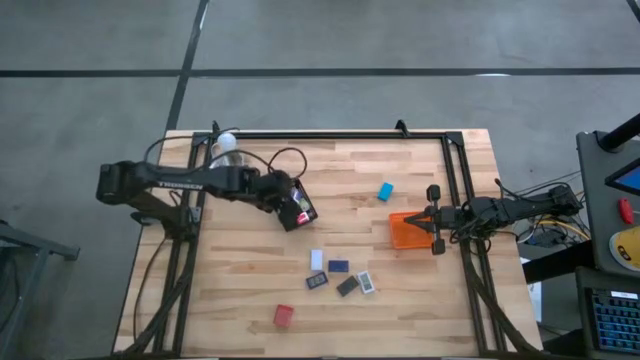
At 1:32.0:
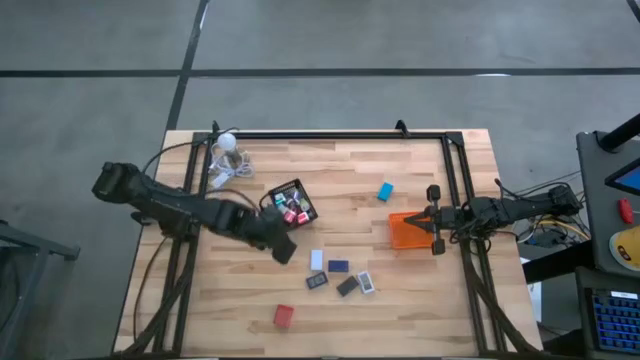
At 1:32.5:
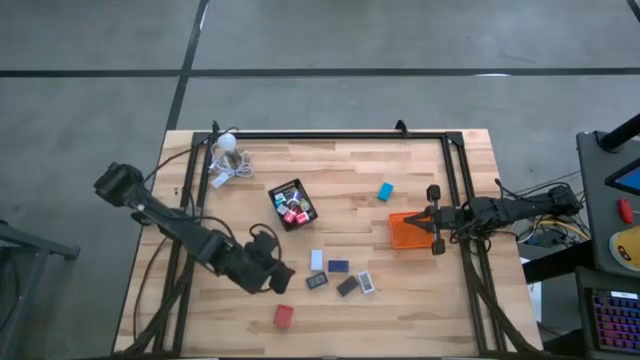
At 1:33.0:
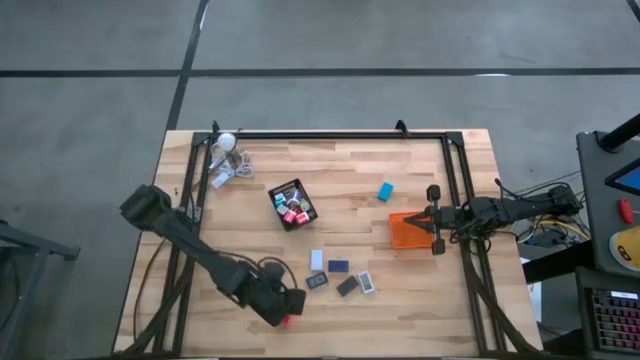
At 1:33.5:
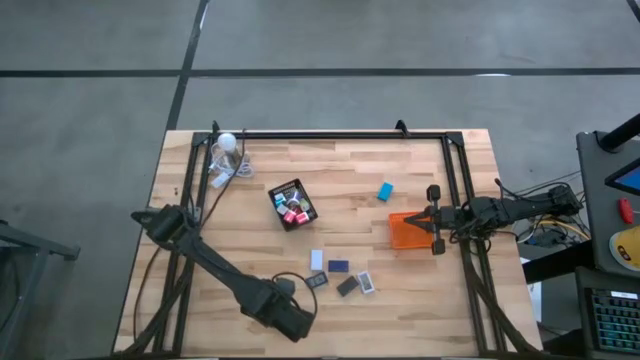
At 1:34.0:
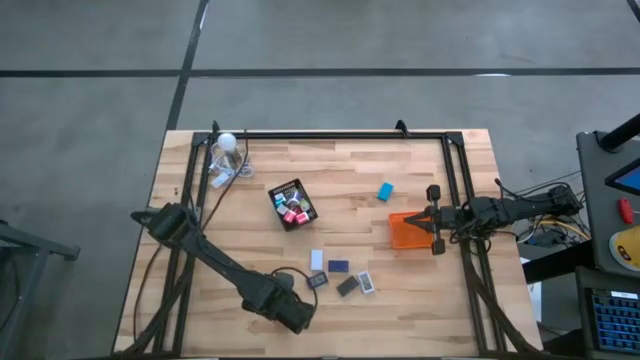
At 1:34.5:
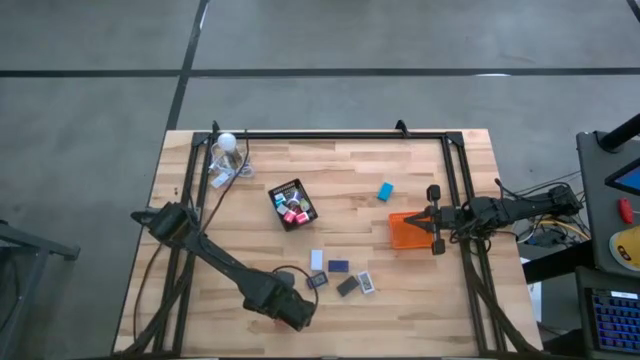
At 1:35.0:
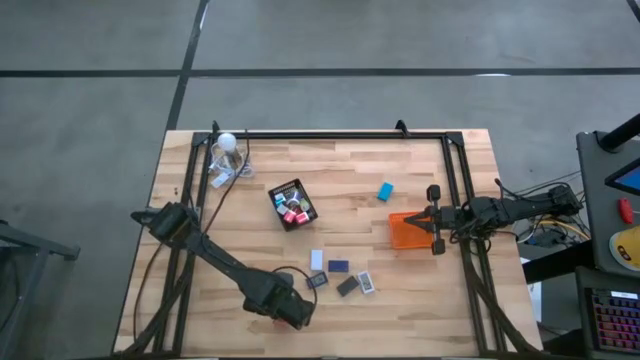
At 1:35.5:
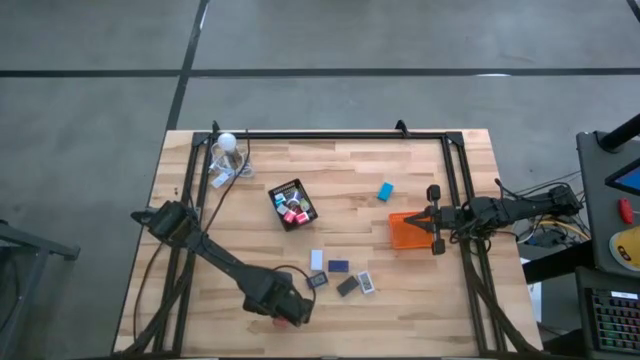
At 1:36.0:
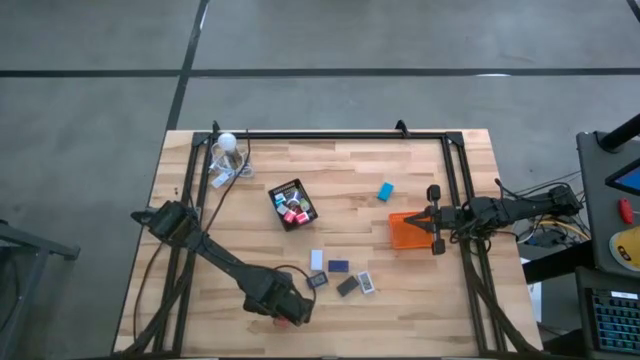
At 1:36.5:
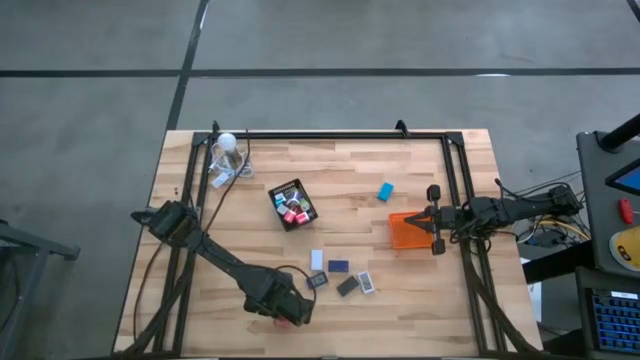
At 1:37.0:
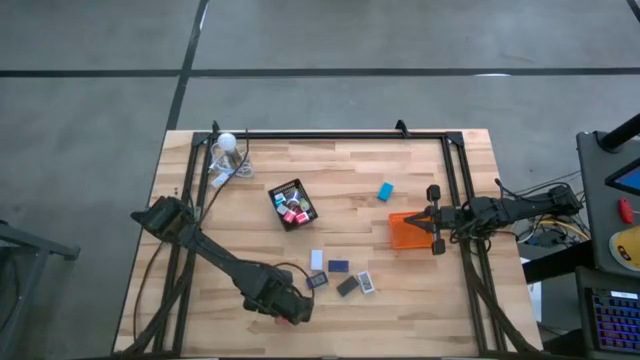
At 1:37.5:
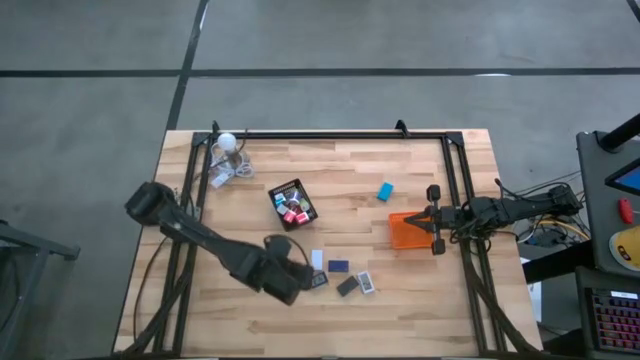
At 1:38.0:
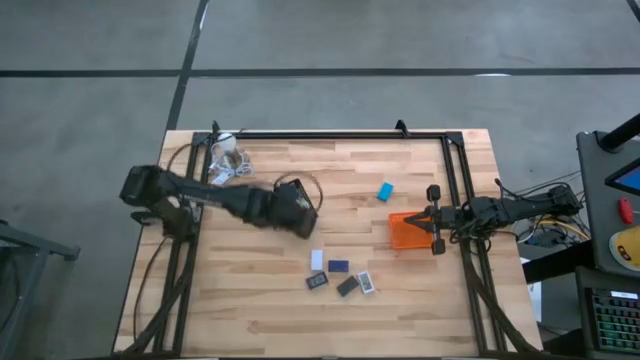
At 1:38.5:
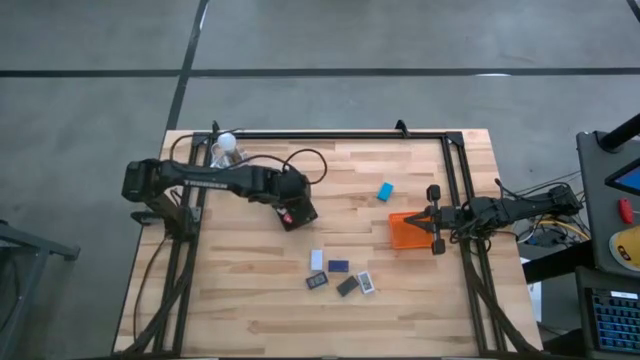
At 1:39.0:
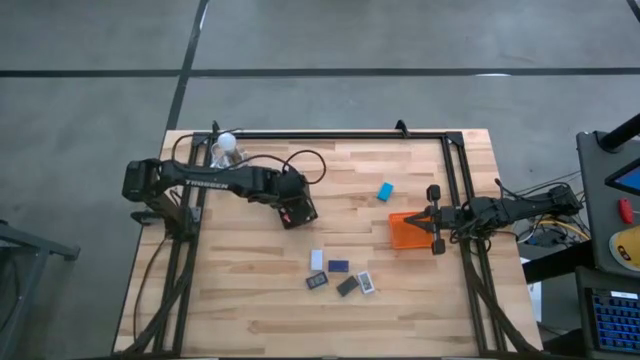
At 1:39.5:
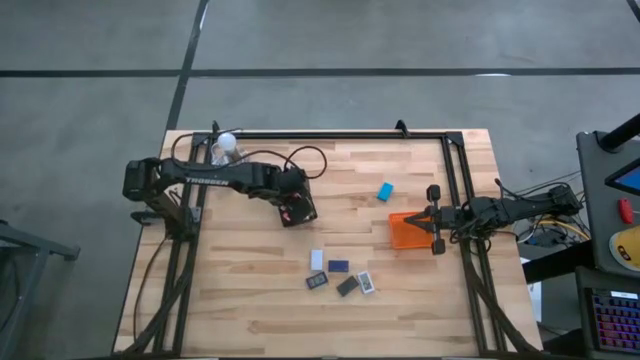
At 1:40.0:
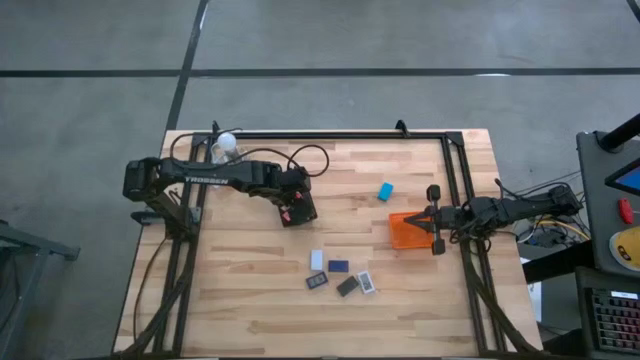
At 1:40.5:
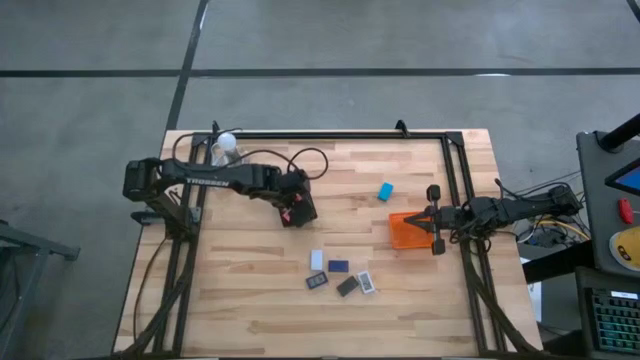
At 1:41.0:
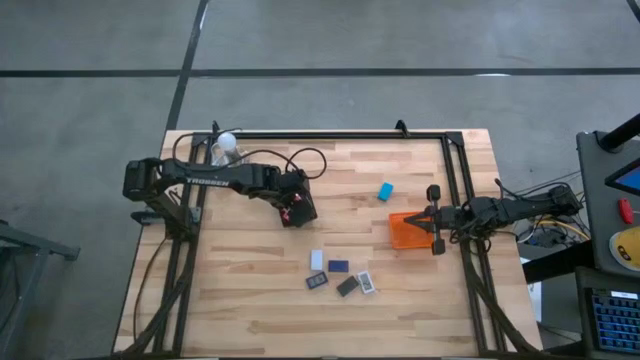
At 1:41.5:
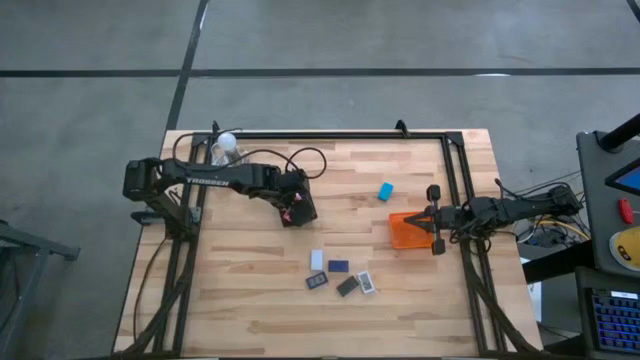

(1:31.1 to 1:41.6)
Task: Pick & Place Office items
Put the red charger adapter in the black bin

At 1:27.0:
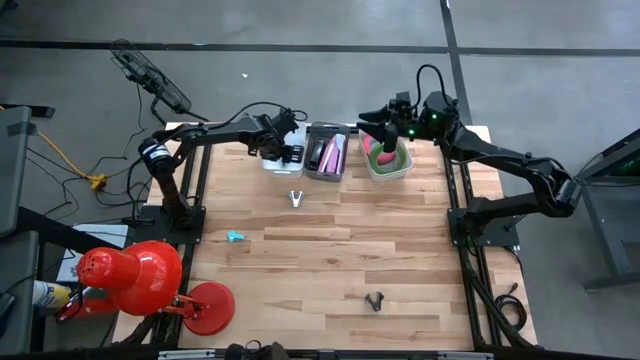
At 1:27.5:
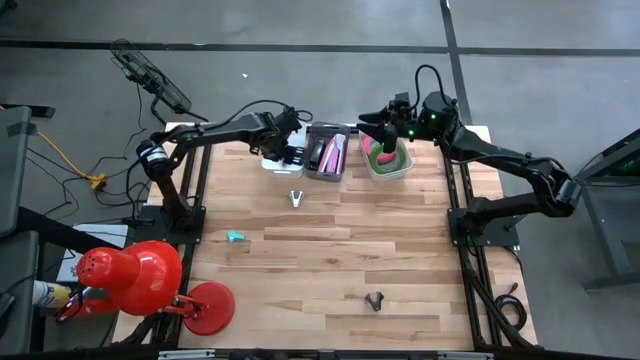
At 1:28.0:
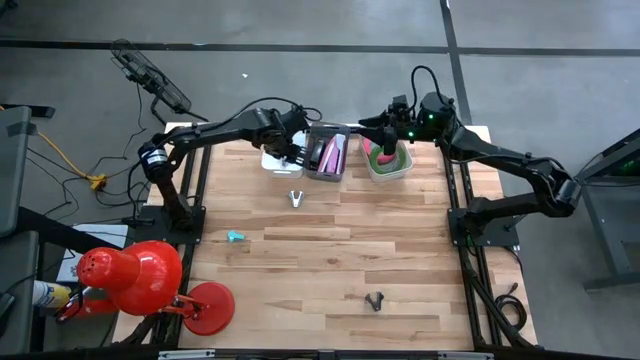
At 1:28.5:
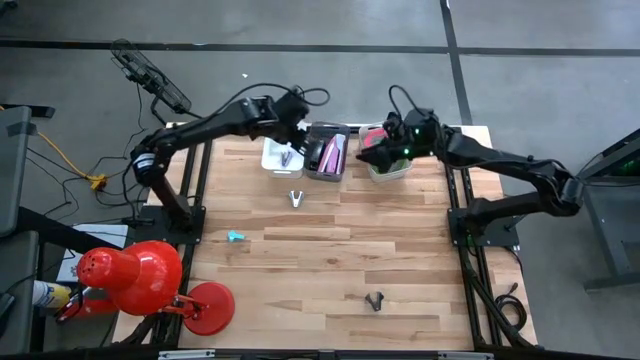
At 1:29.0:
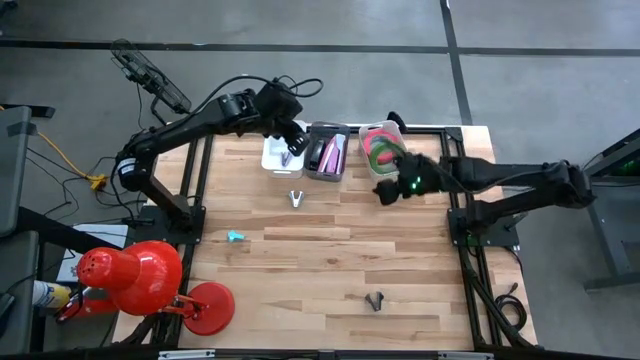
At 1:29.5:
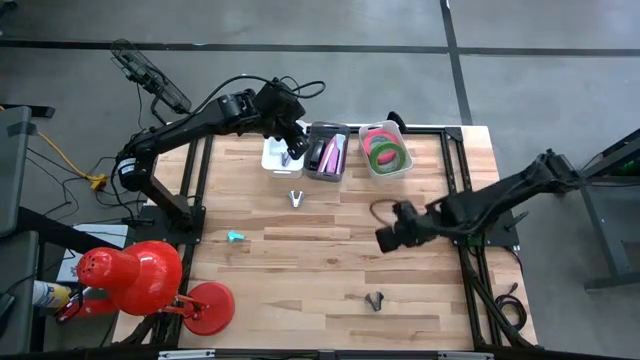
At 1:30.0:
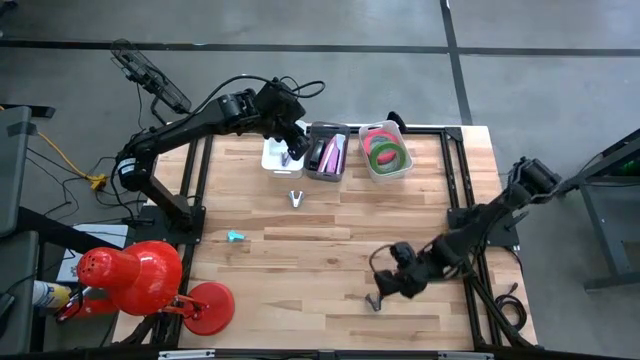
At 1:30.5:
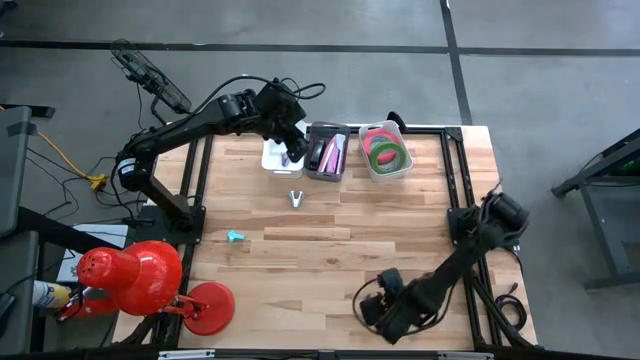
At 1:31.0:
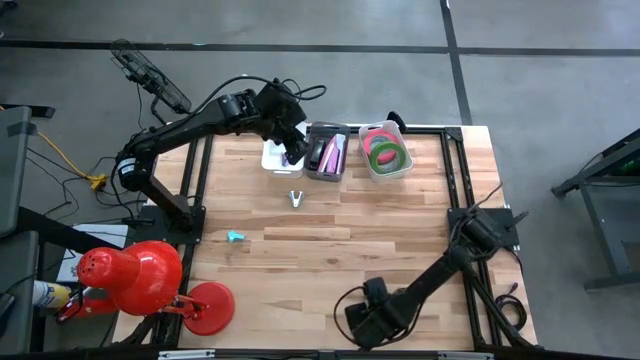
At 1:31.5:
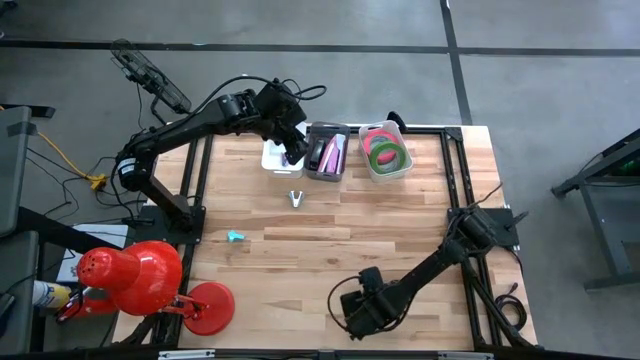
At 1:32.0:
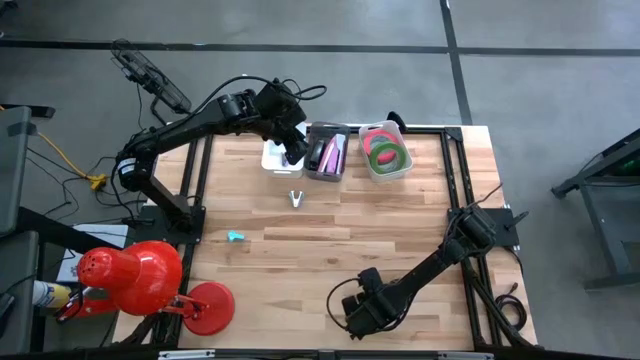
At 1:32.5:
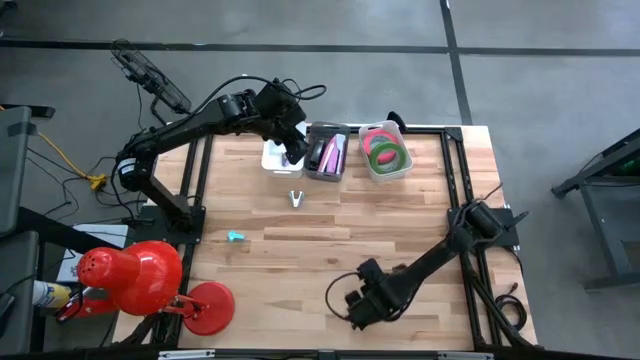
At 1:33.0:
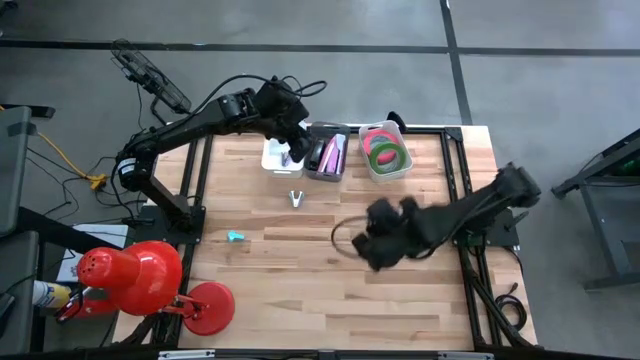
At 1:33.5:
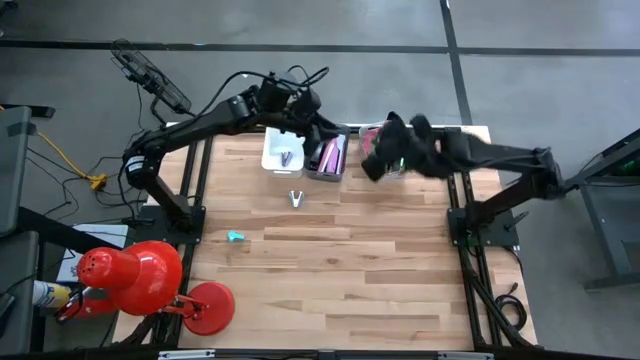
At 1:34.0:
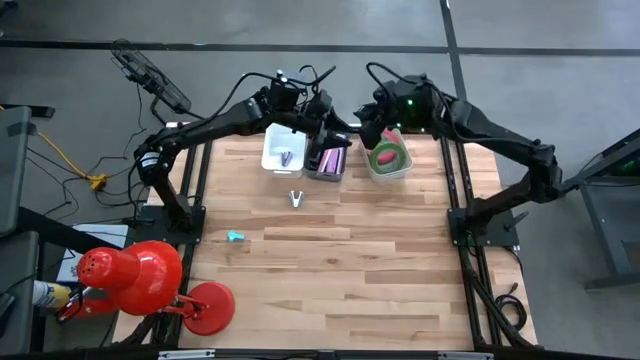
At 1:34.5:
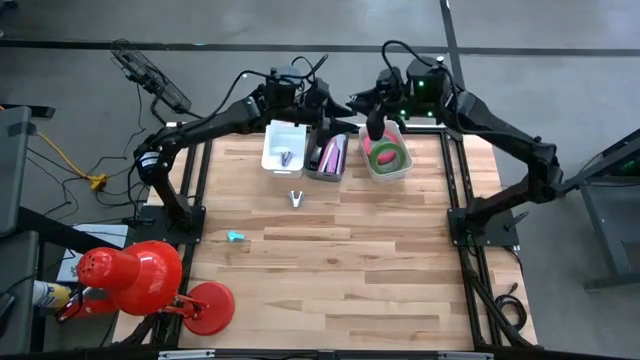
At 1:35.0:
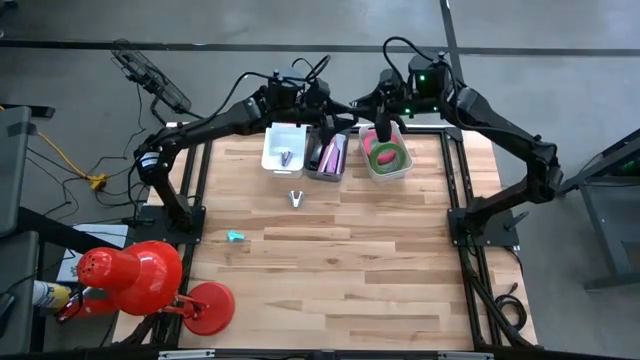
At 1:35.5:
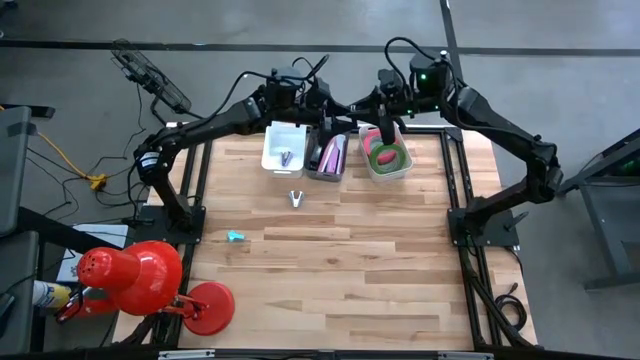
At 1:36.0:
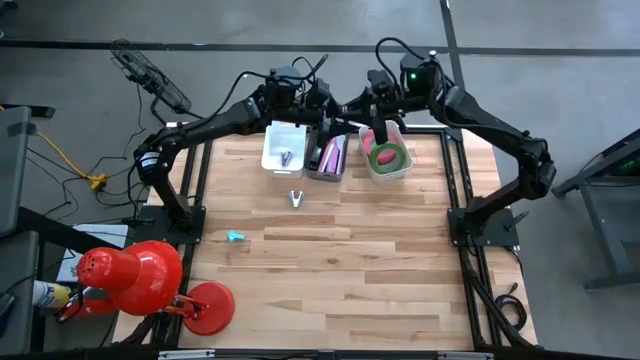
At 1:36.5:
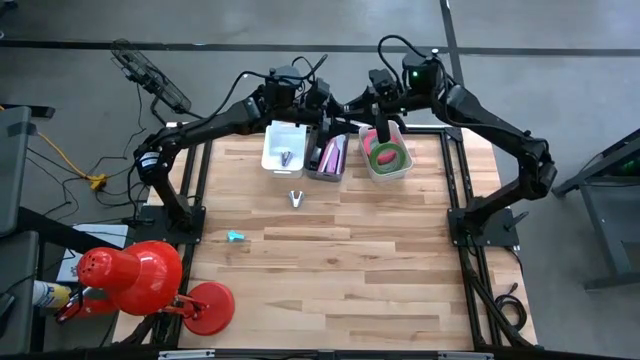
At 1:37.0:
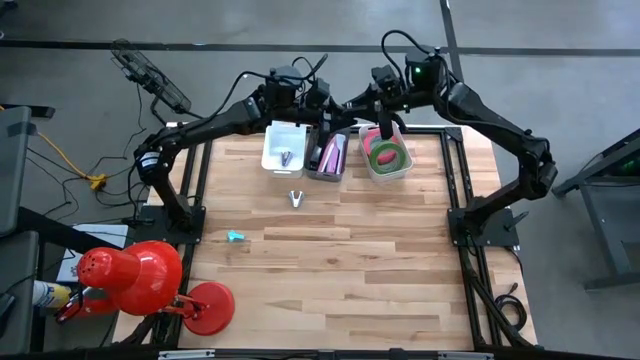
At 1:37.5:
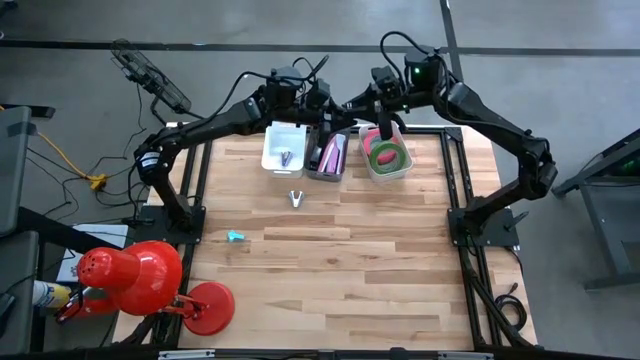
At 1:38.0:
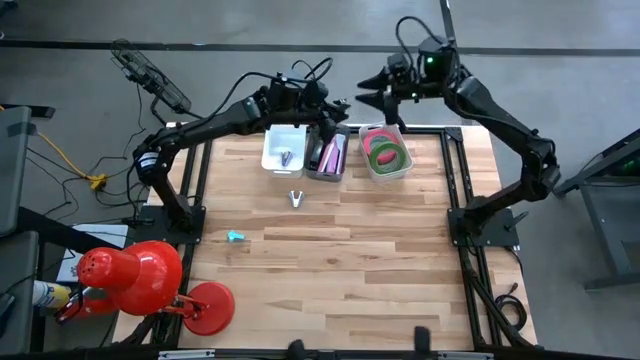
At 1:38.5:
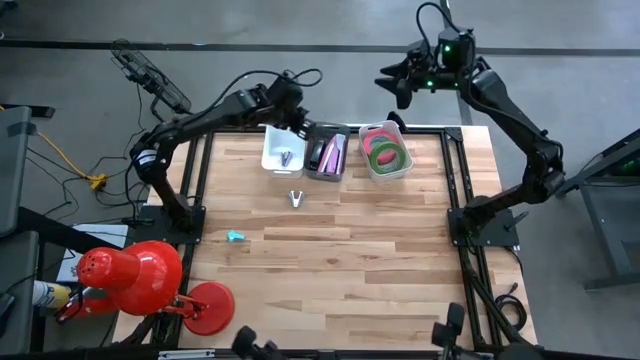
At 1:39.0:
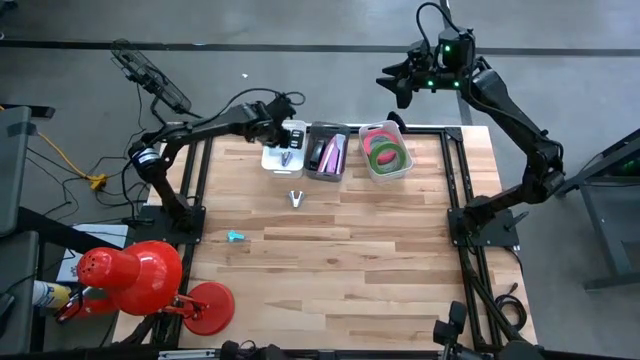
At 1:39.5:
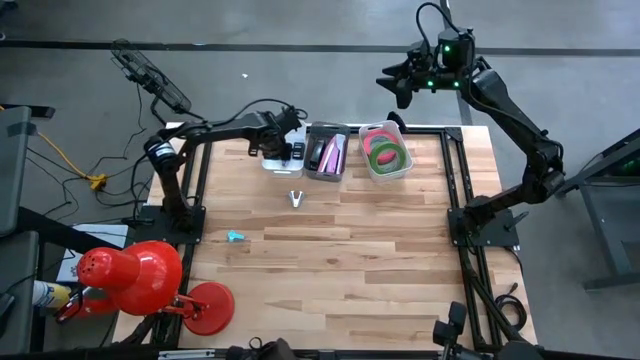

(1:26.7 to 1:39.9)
Task: Pick and place Stapler, Stapler remover, tape
Put the black staple remover into the left white bin
